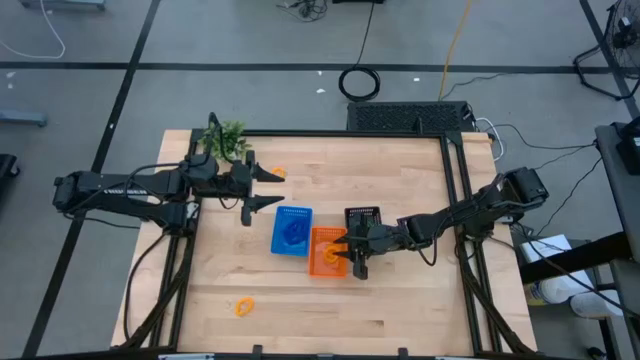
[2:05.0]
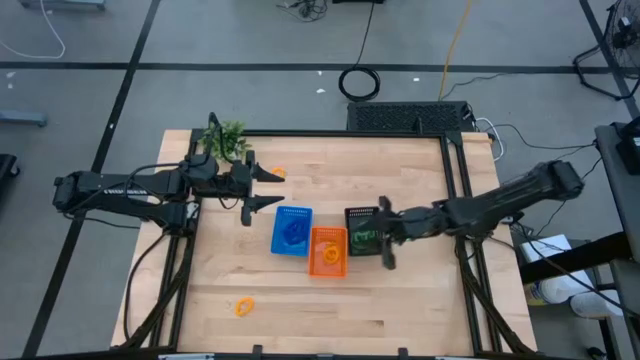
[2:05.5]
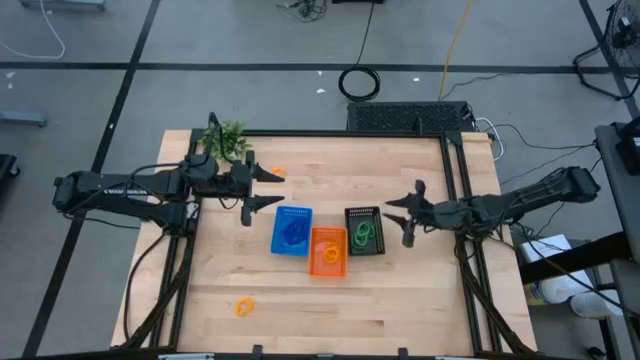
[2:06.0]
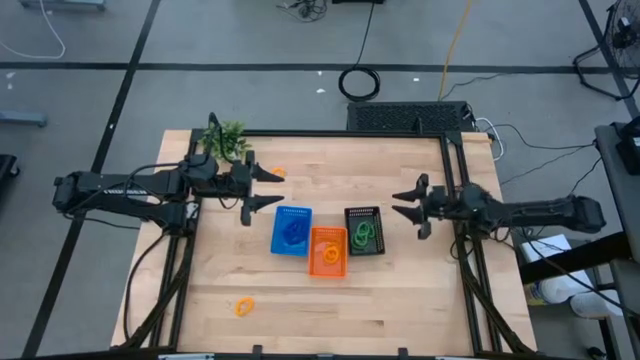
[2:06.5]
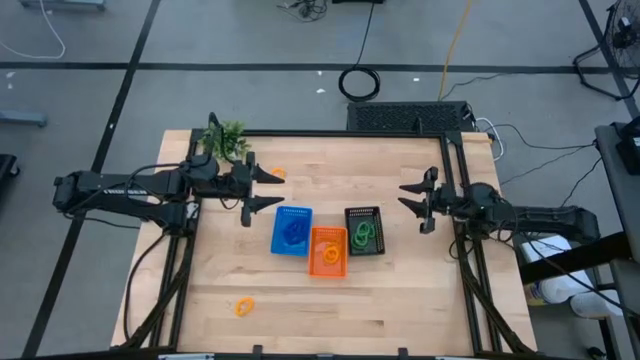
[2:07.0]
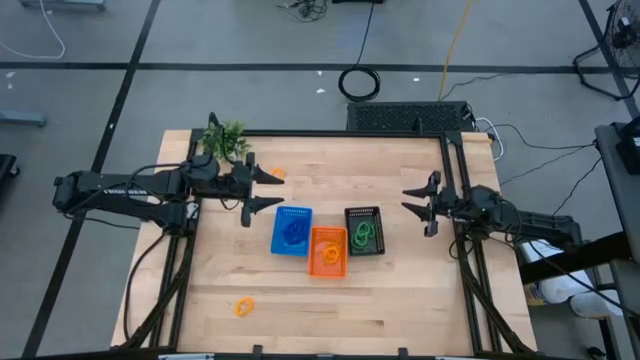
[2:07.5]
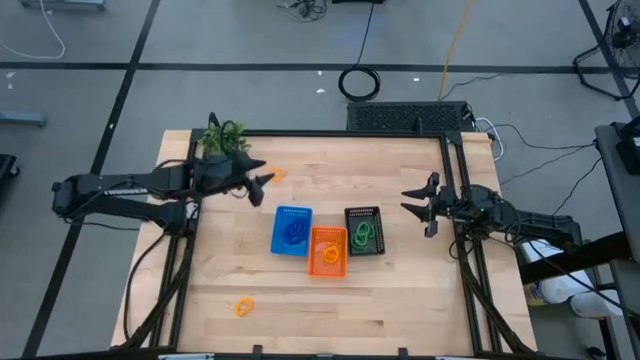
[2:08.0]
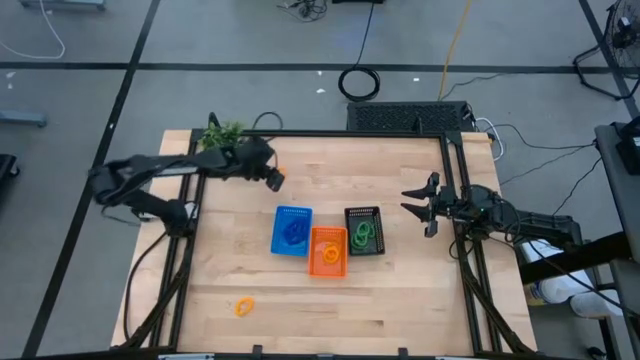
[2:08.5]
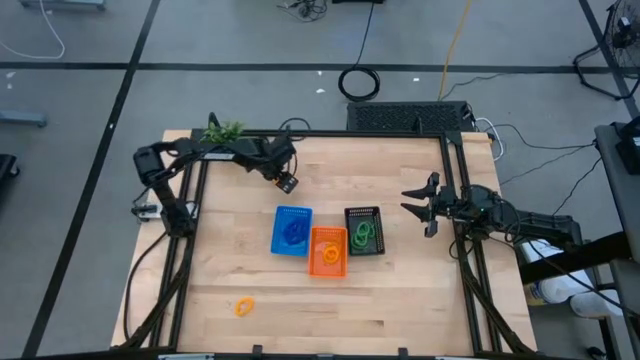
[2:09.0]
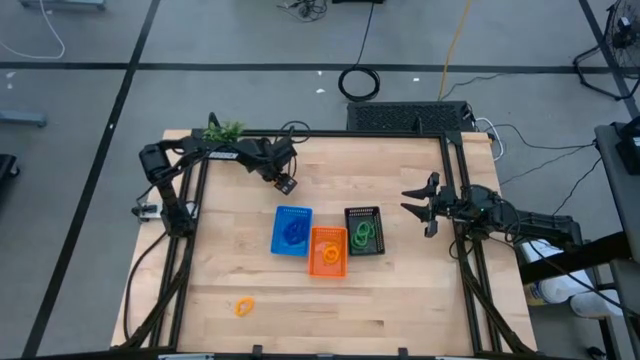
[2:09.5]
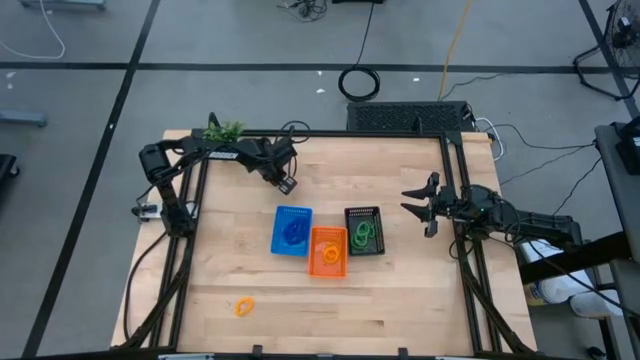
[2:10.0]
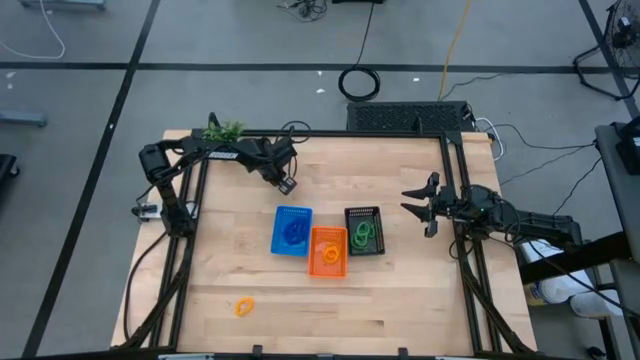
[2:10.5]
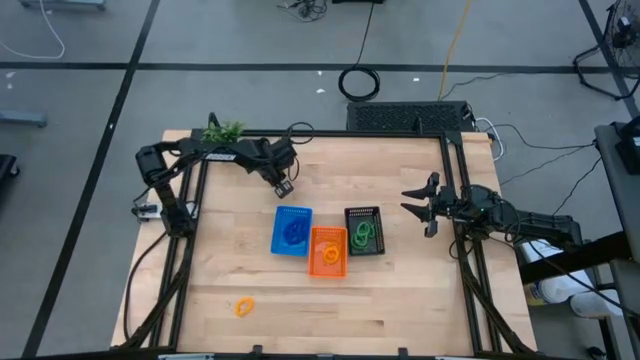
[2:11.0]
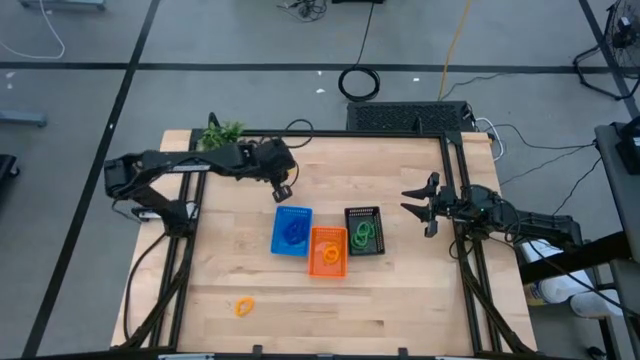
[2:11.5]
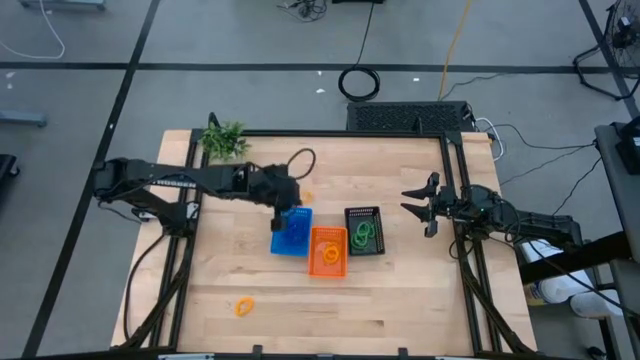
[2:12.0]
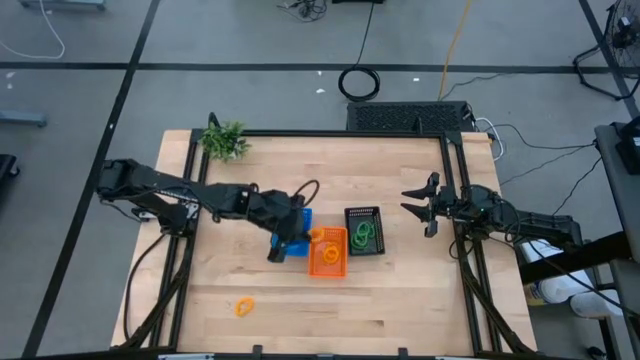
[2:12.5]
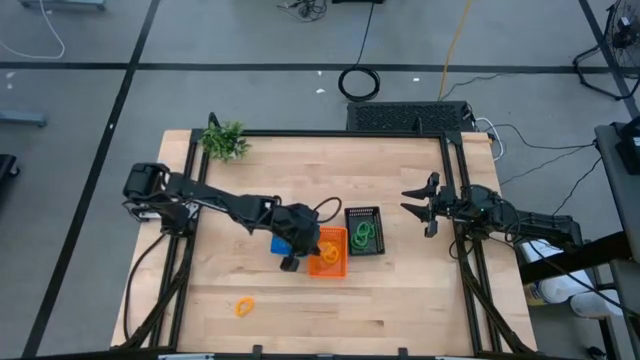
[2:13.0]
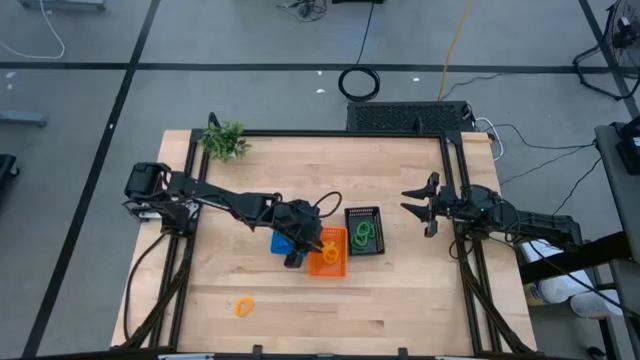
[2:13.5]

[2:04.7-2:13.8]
Task: Sort spring keychains
Put the yellow spring keychain into the orange bin

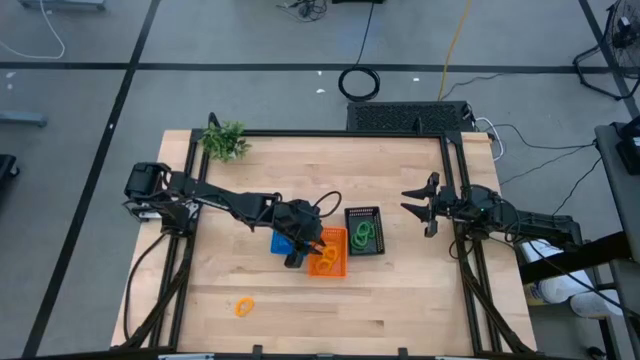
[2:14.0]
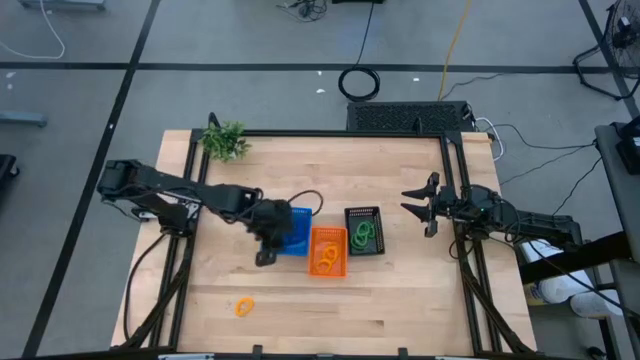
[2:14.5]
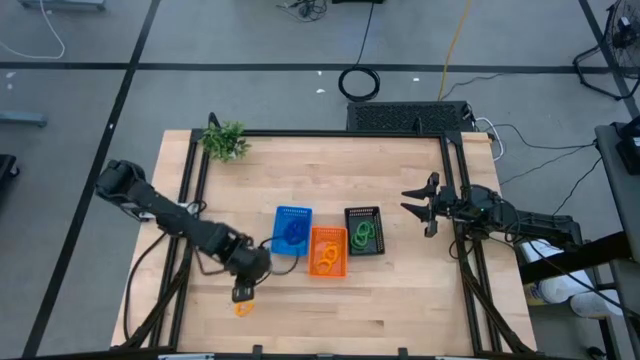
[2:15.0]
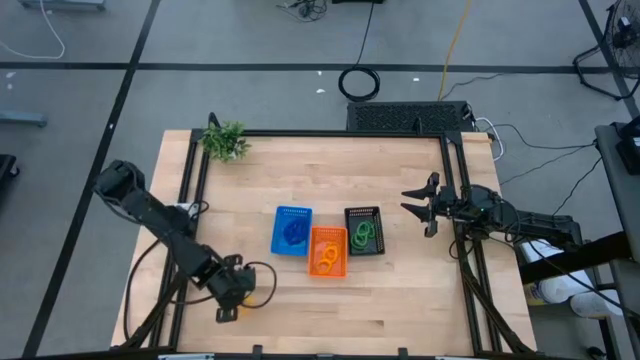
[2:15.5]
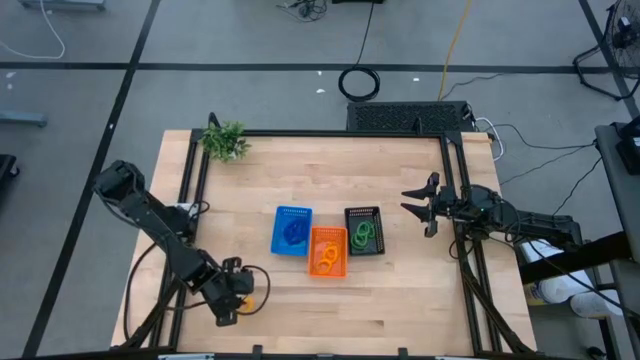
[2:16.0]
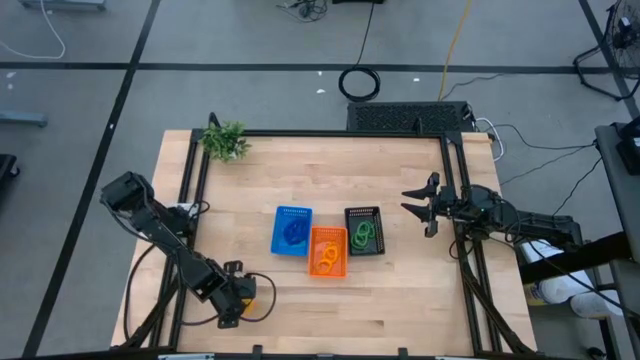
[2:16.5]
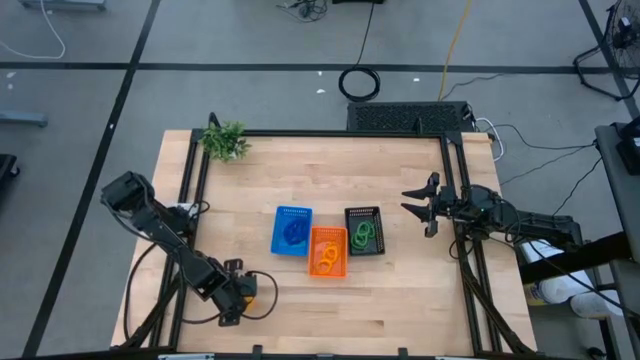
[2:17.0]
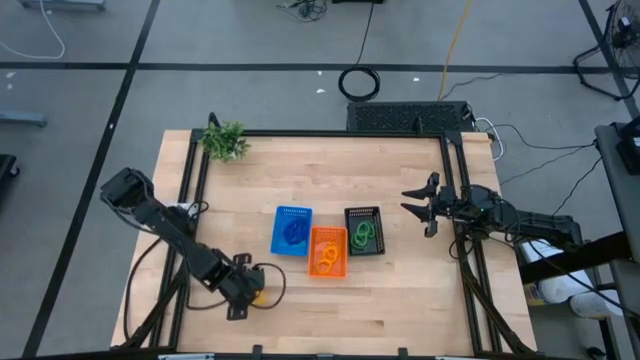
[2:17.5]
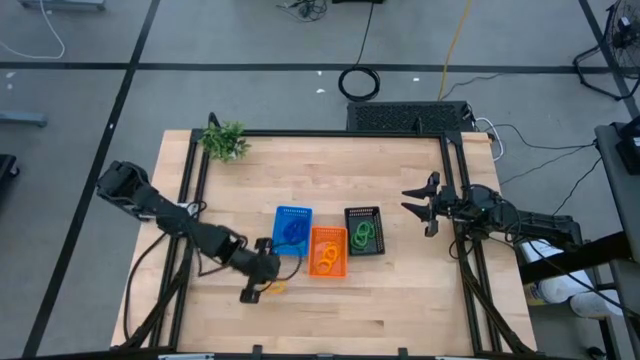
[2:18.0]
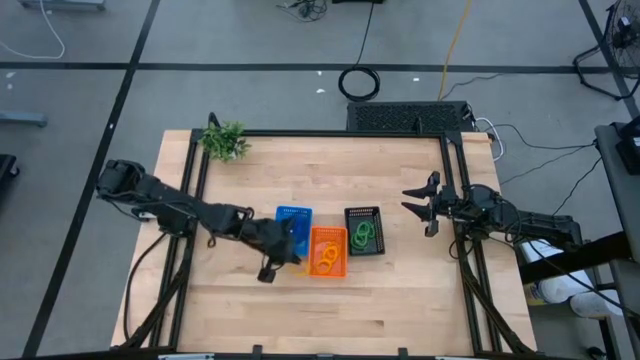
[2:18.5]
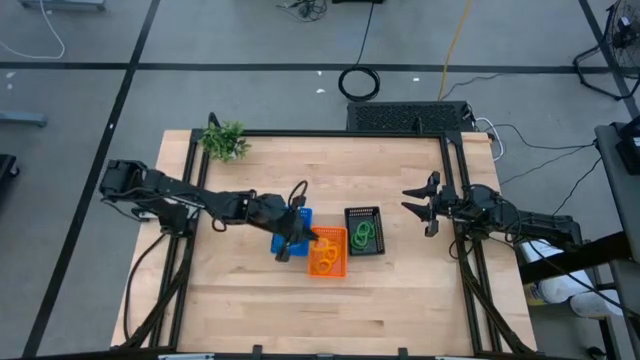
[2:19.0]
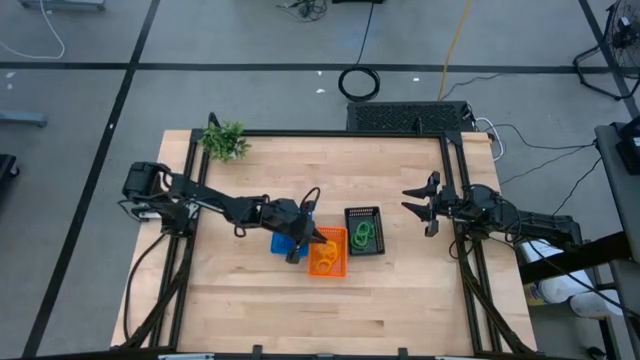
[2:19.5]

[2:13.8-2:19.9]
Put the yellow spring keychain into the orange bin

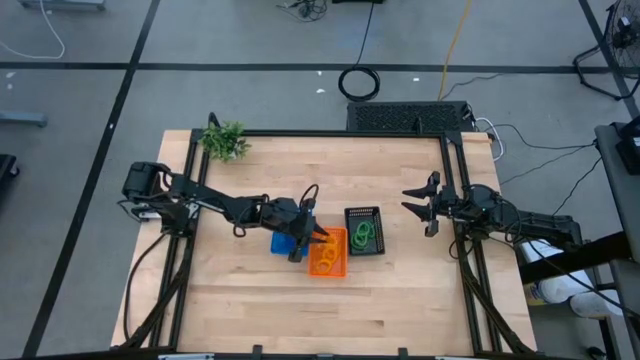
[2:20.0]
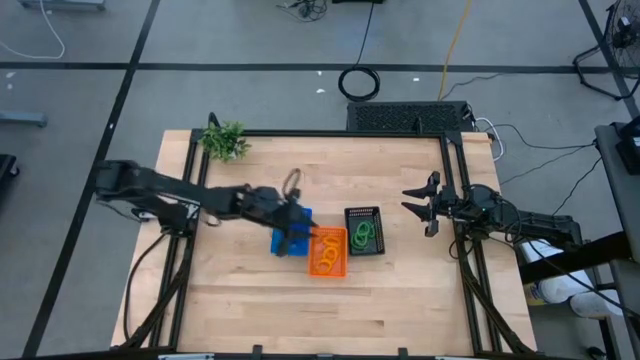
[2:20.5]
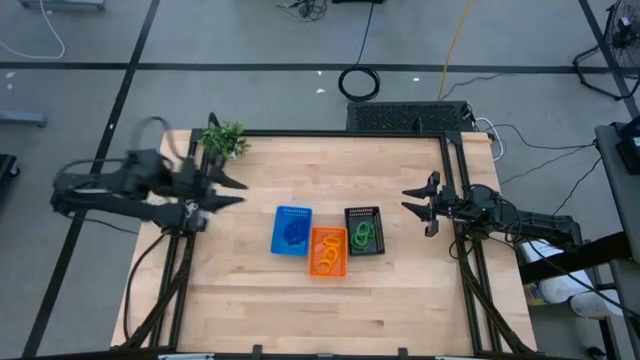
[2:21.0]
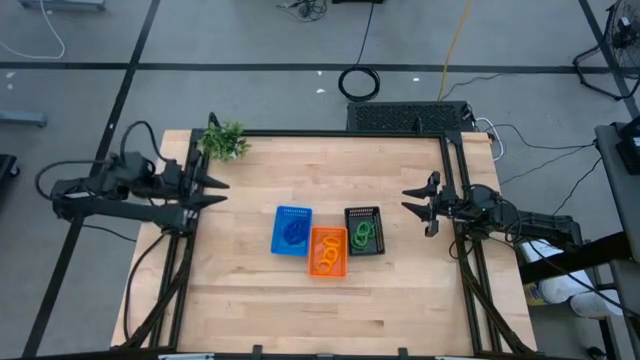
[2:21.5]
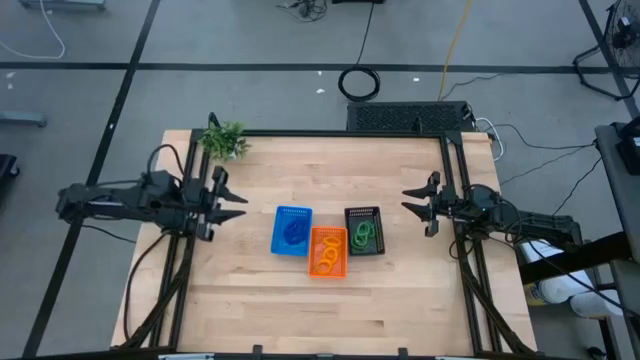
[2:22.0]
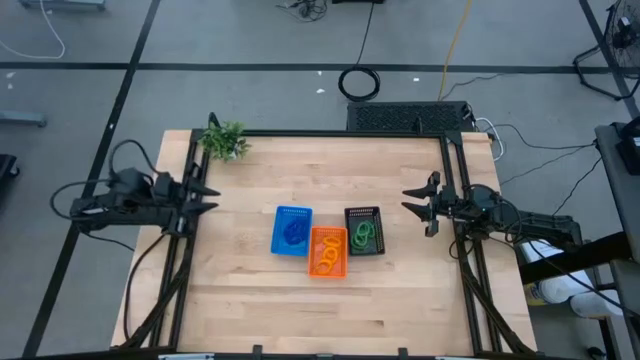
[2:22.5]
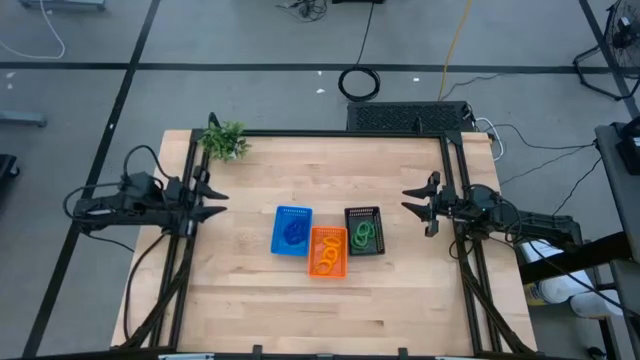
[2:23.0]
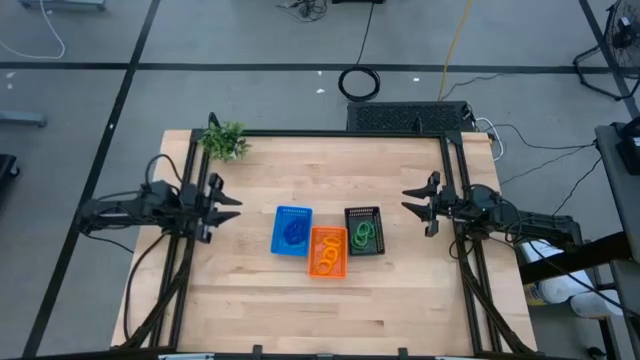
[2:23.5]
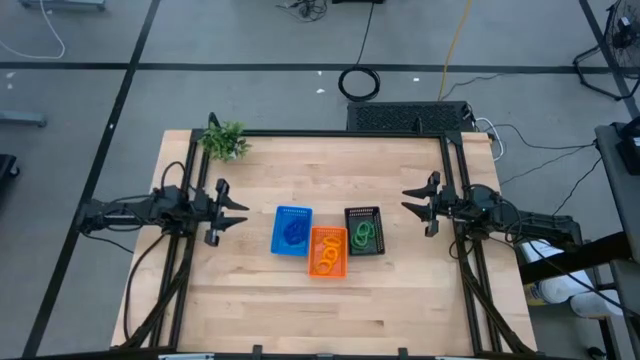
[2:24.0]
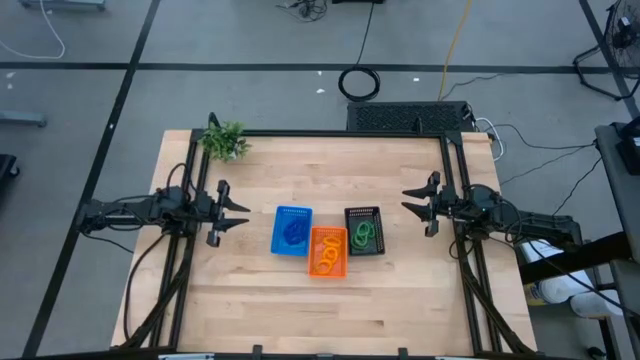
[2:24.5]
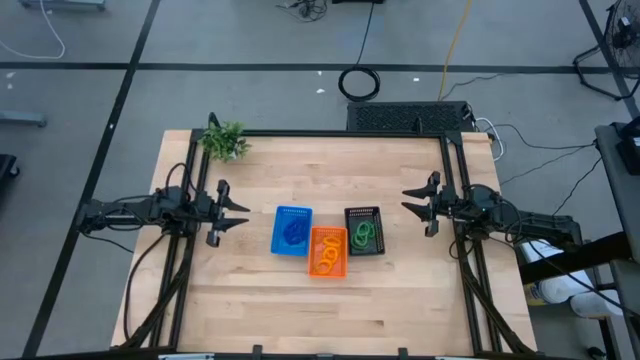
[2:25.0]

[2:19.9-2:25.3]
Return to Home Position
